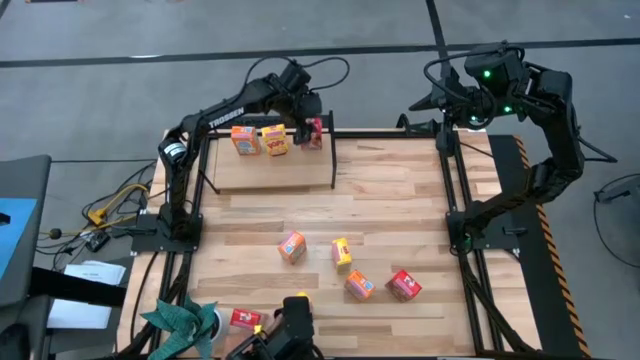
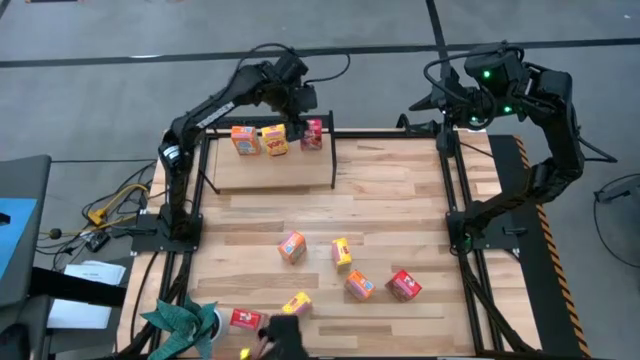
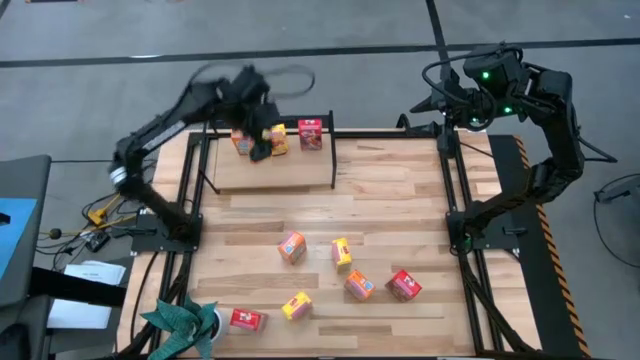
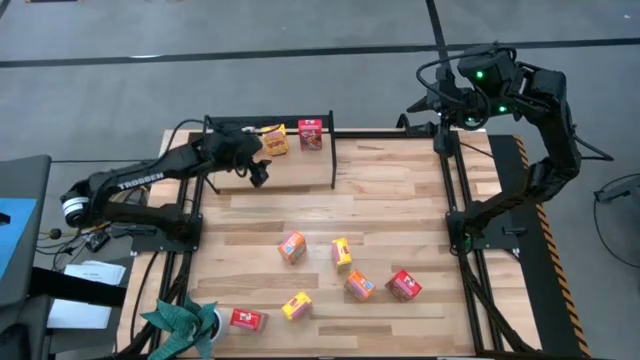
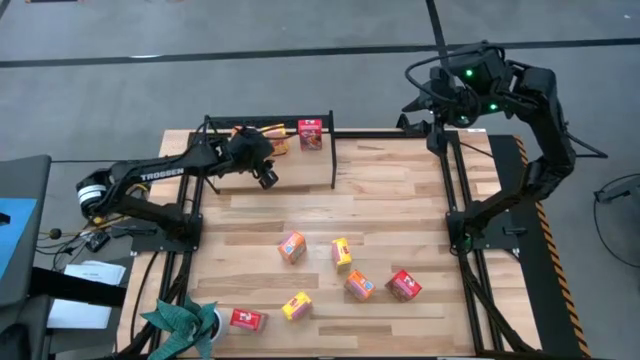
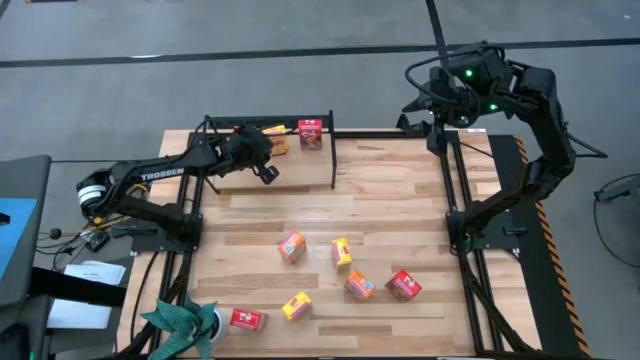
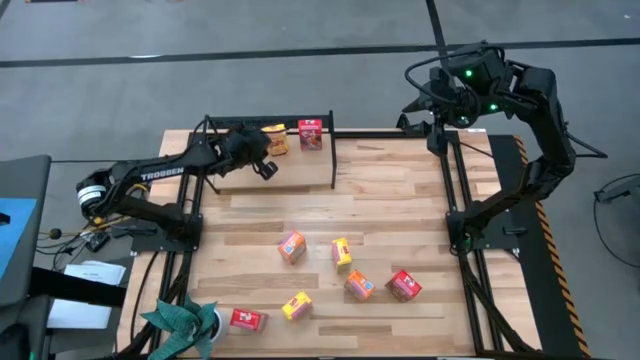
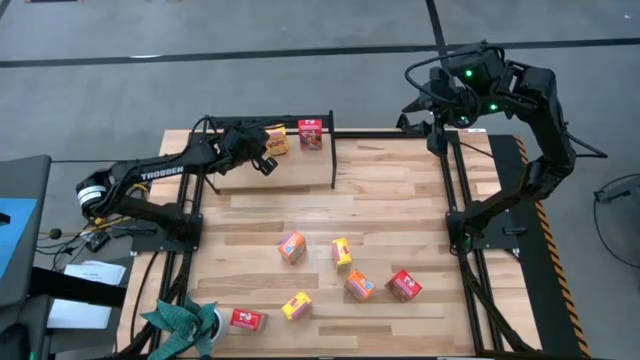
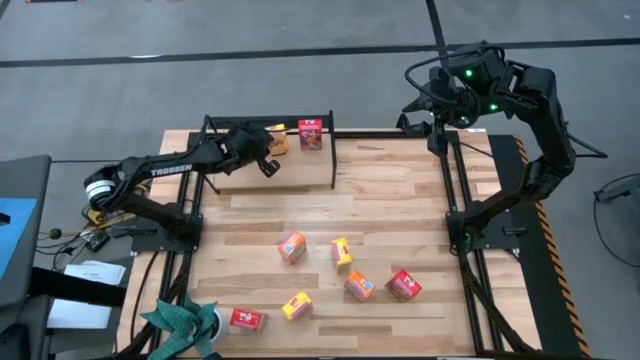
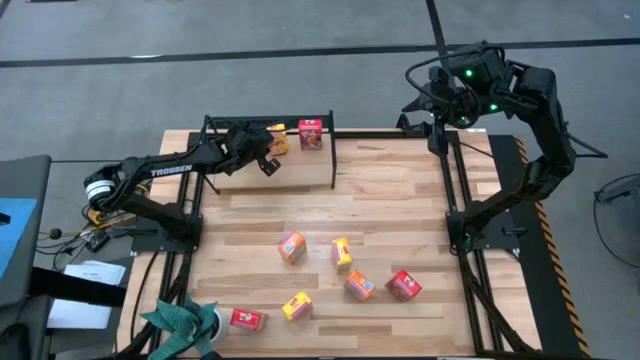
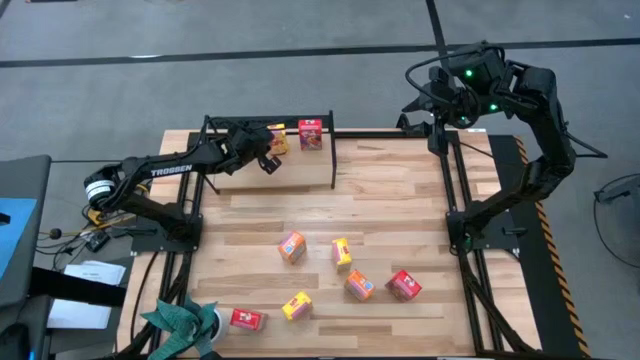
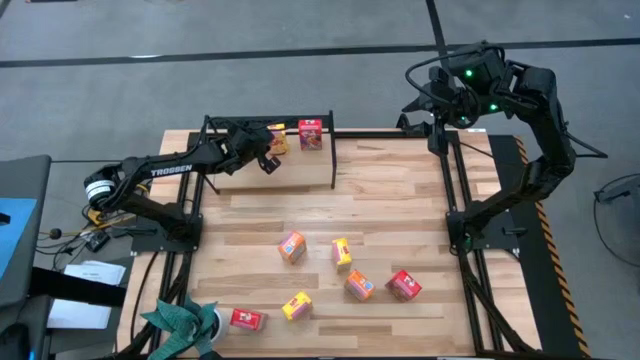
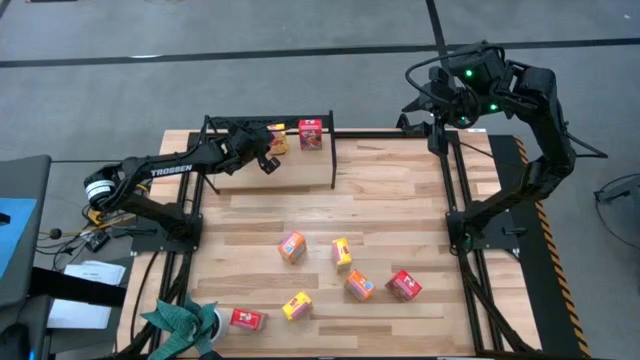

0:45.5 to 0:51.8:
Task: Stack cereal on shelf
Adjust the yellow cereal box on the shelf

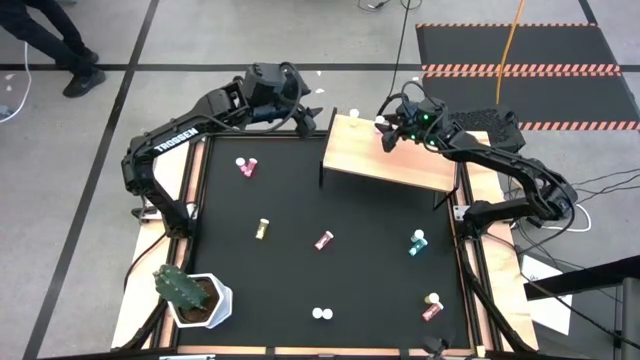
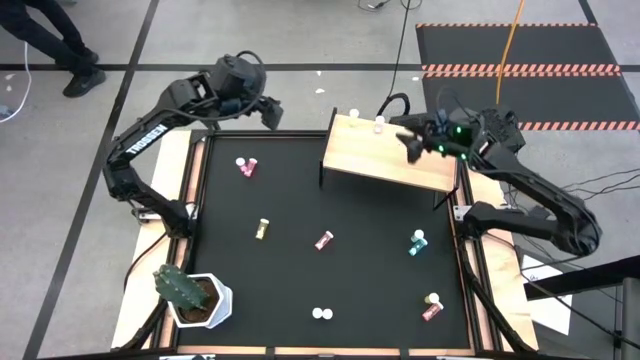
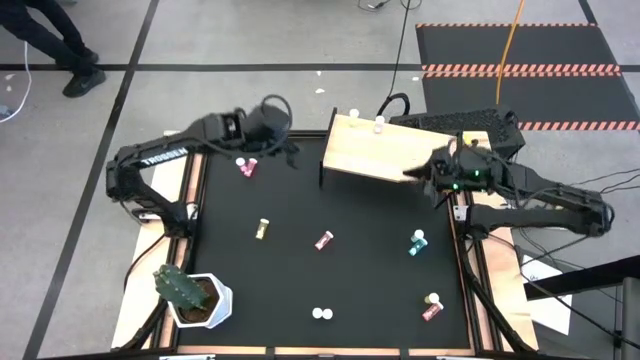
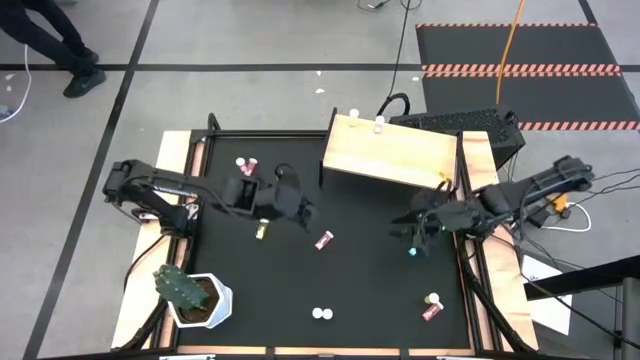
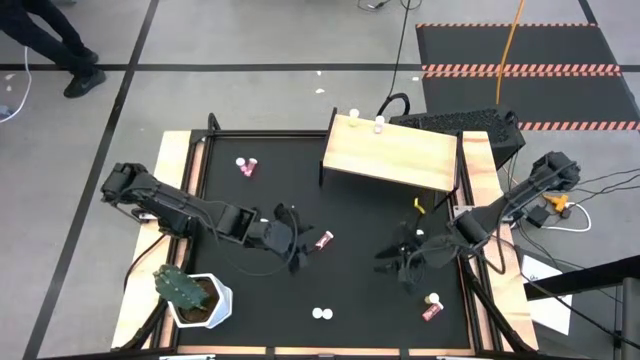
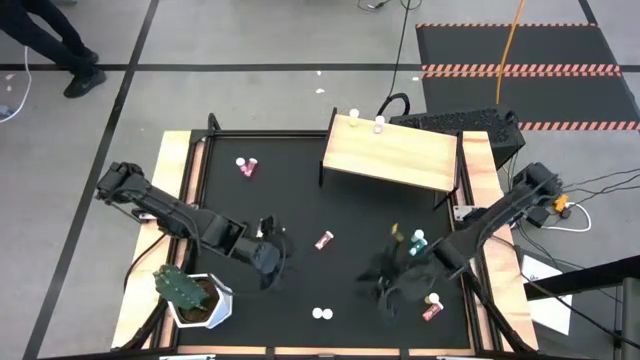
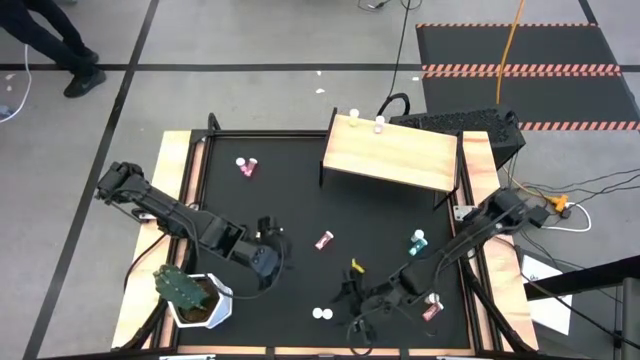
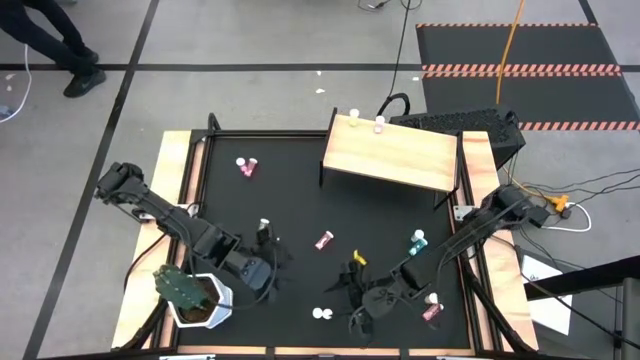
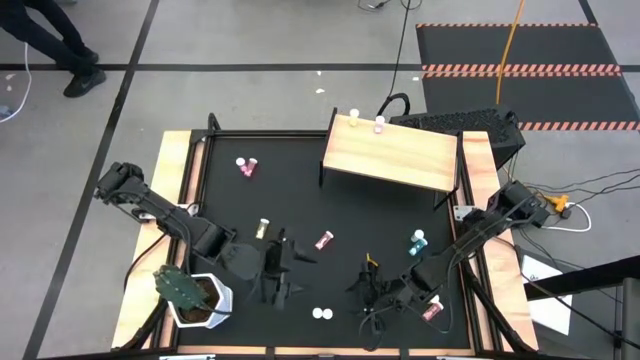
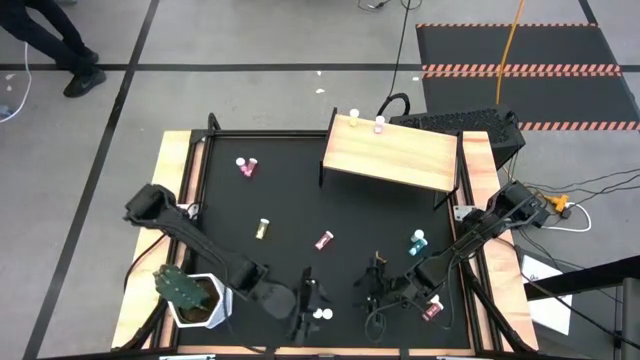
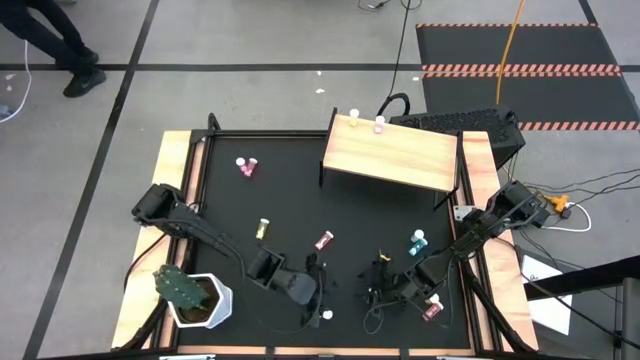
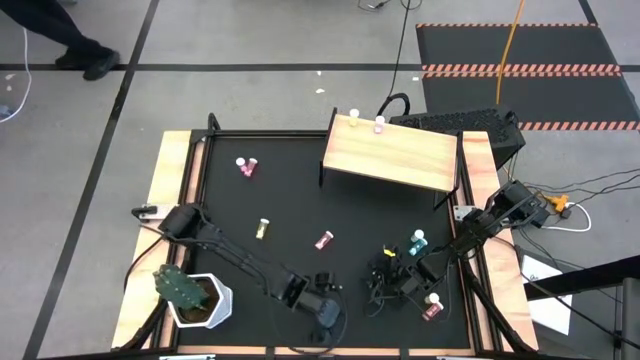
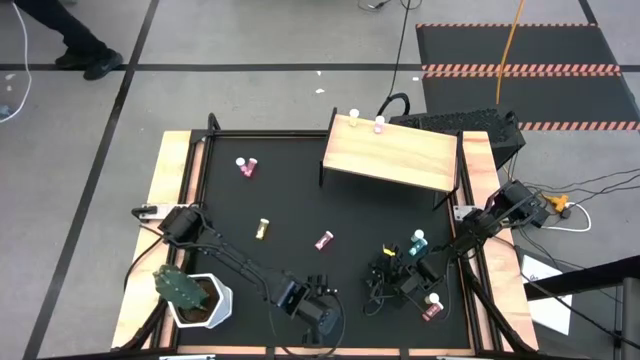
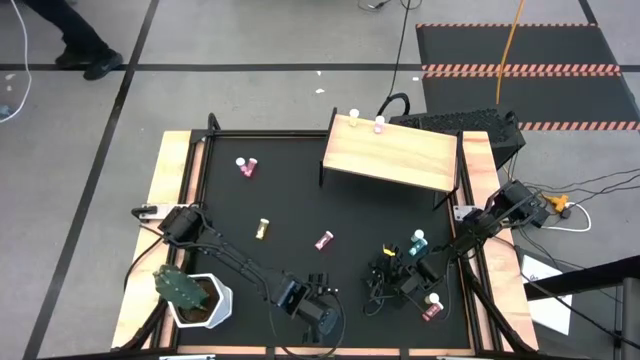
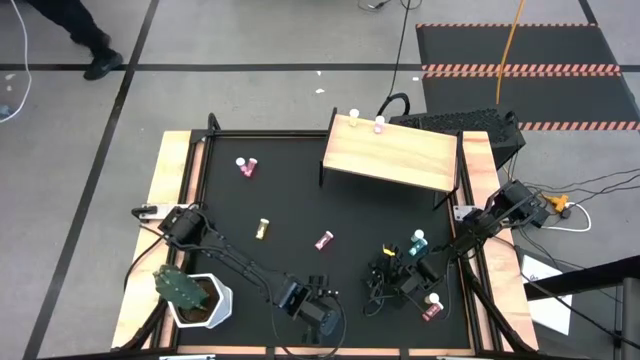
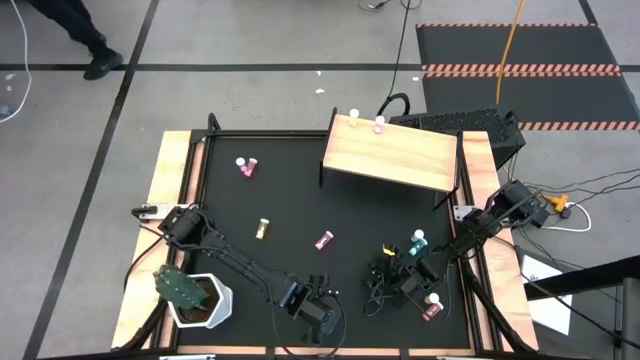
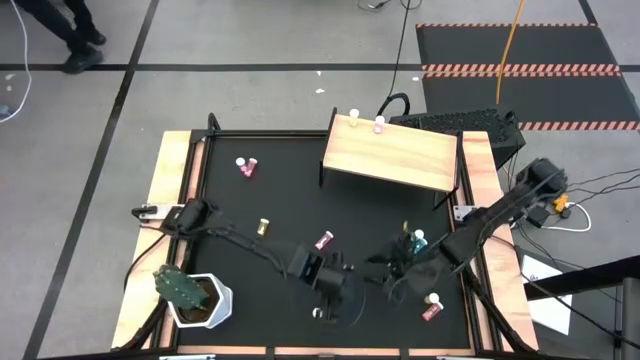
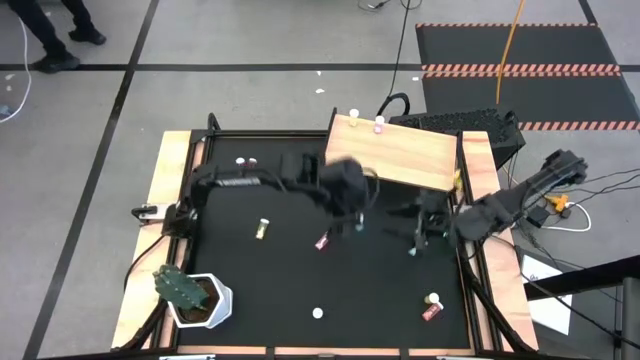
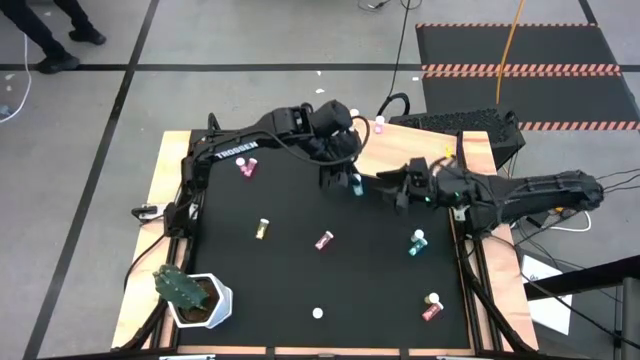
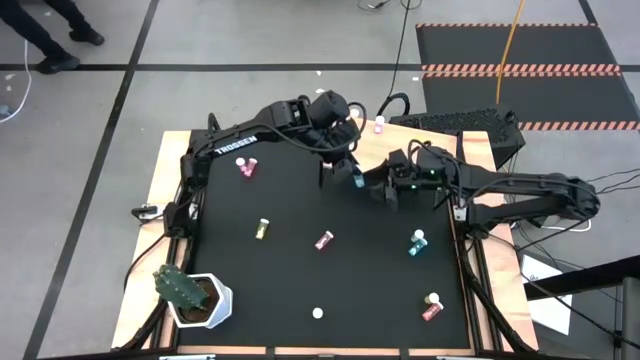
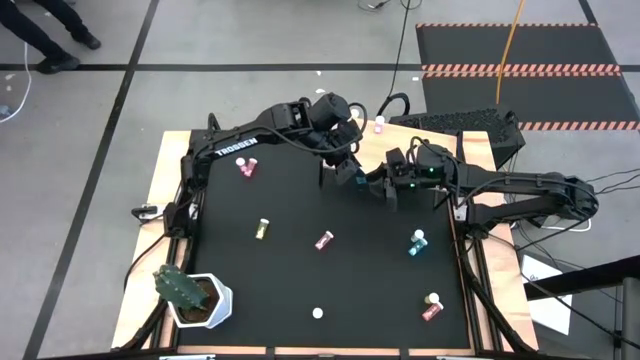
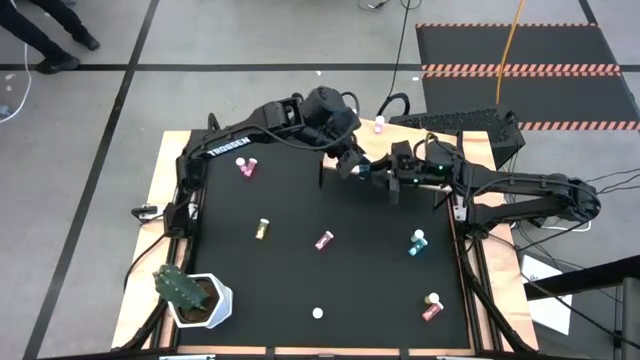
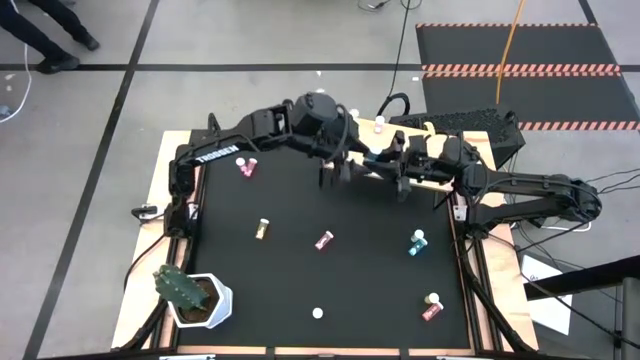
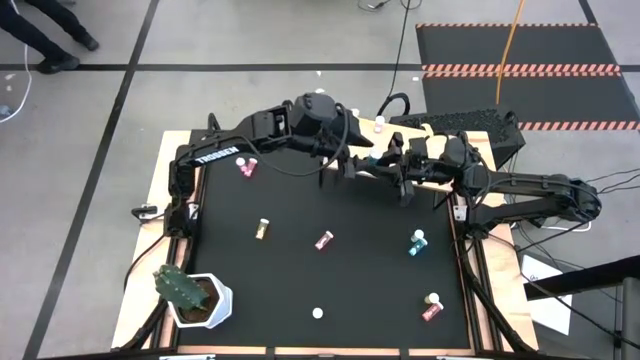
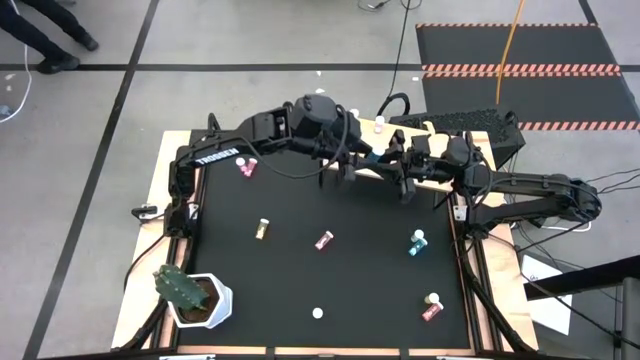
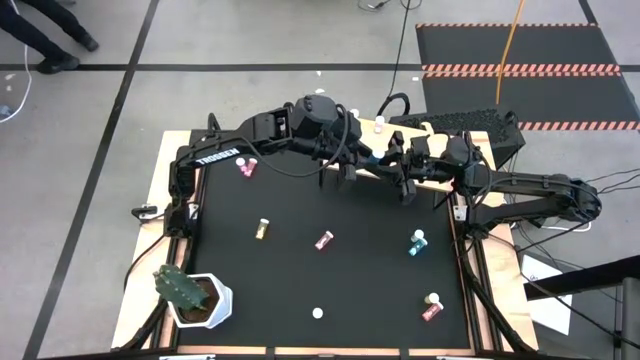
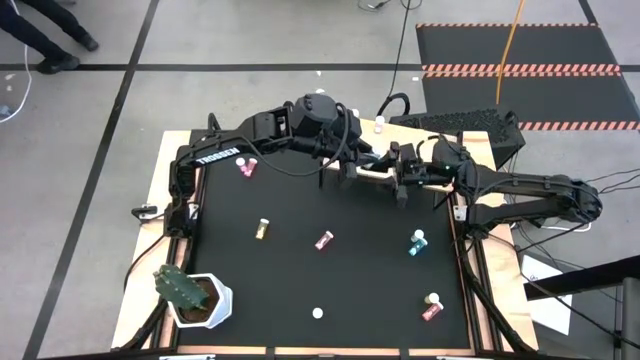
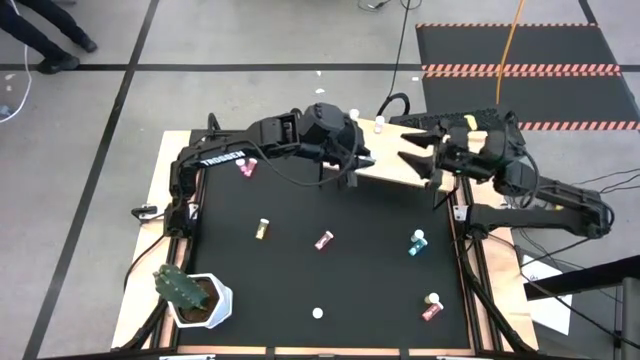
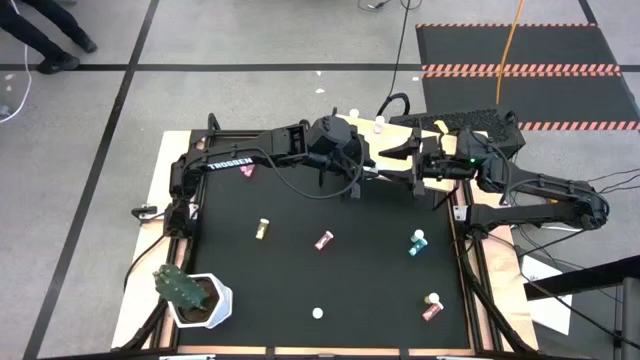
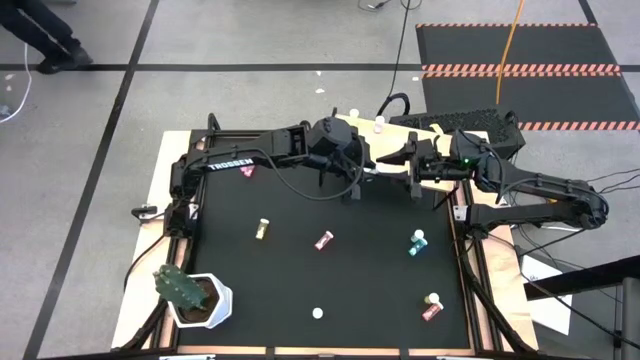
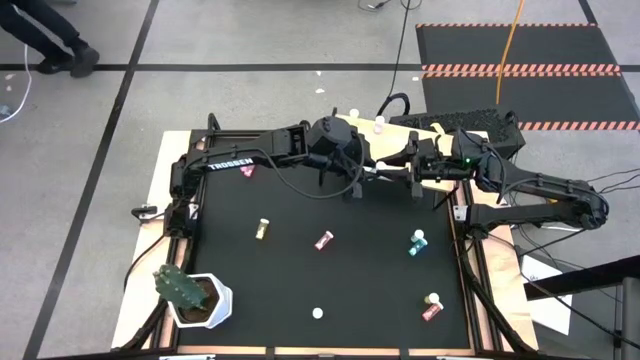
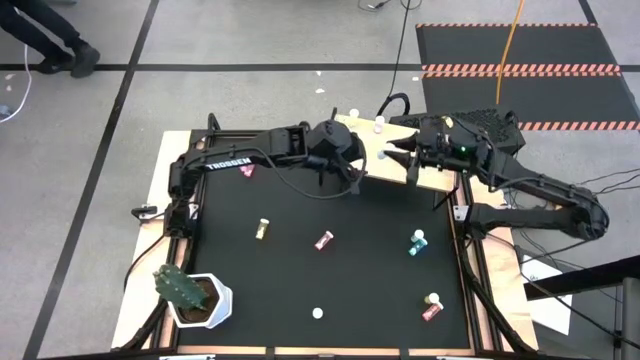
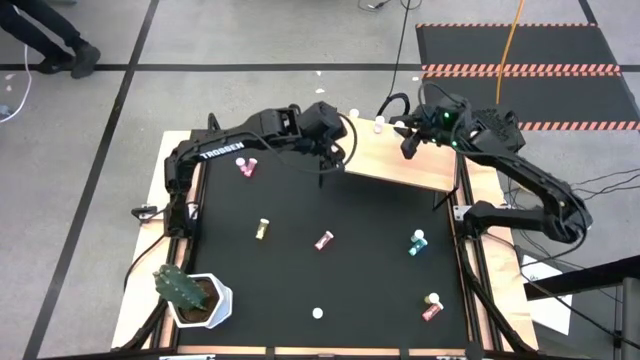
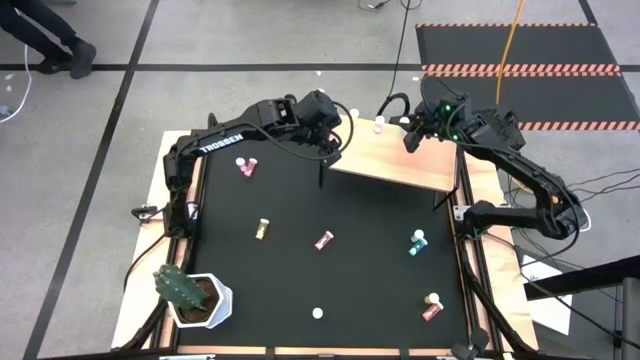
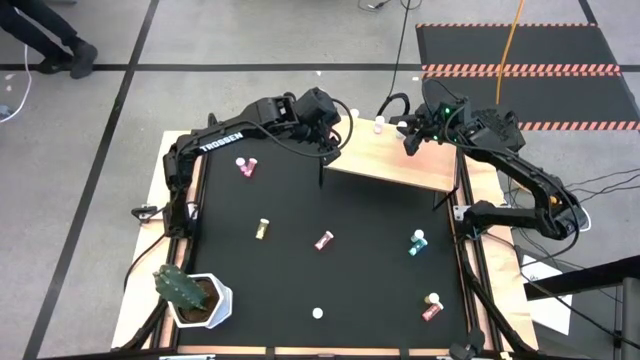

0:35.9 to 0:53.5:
Task: Pick and place medicine bottles onto shelf by color
Put the left blue pill bottle on the shelf
